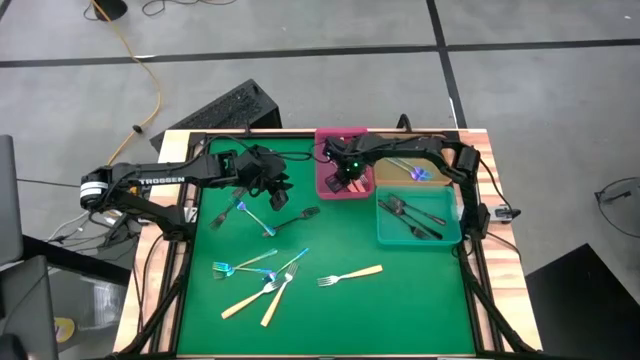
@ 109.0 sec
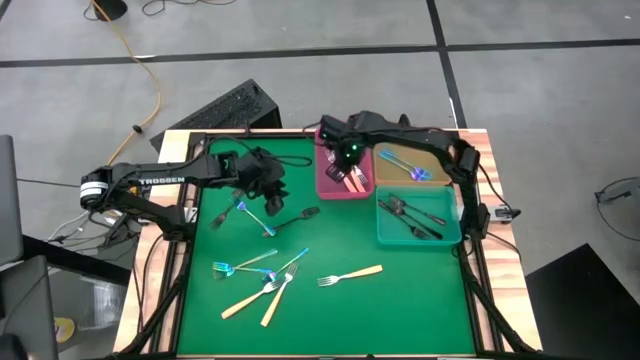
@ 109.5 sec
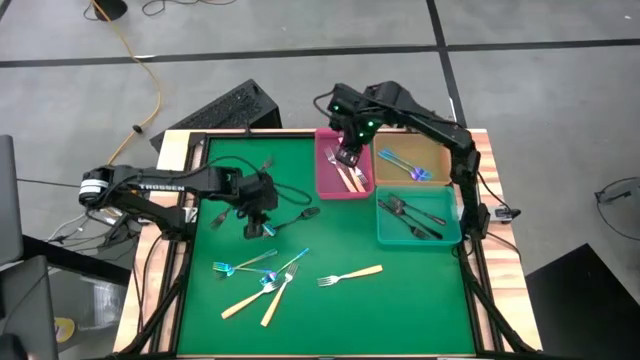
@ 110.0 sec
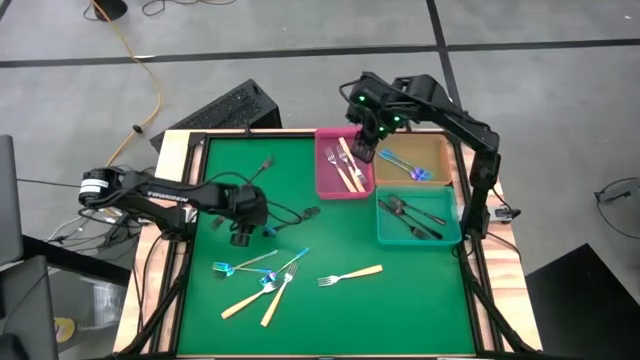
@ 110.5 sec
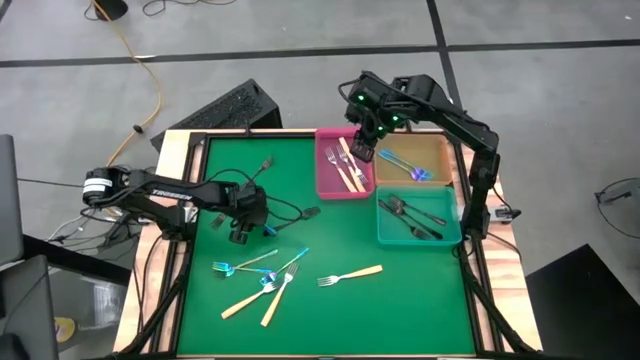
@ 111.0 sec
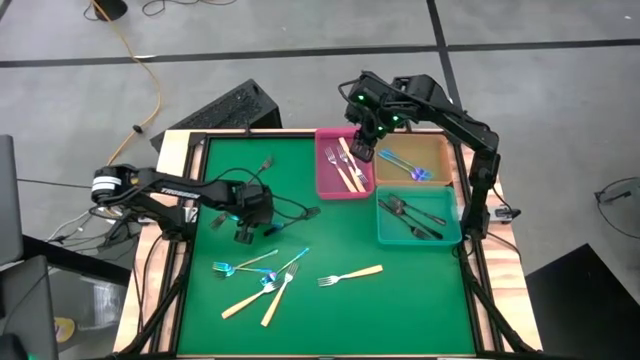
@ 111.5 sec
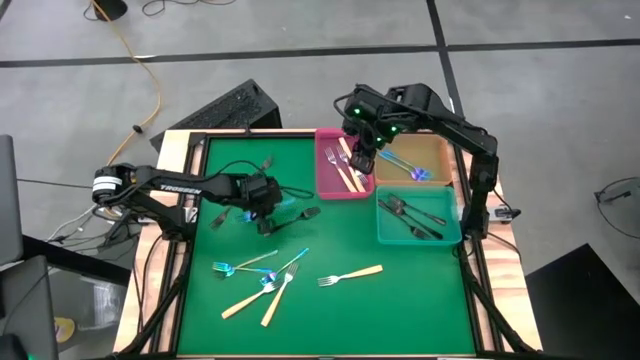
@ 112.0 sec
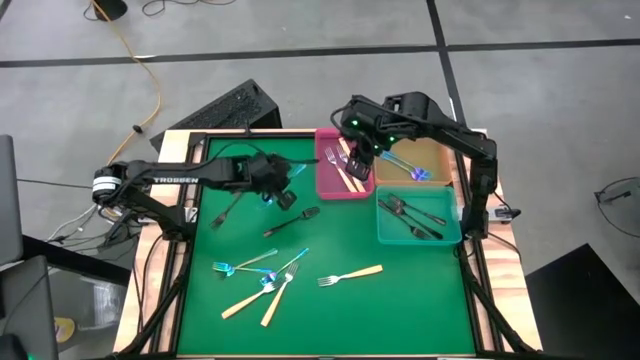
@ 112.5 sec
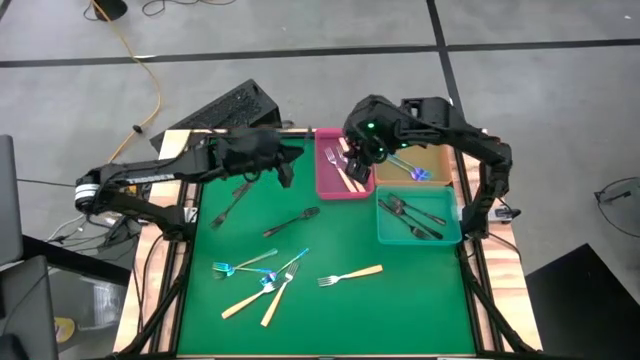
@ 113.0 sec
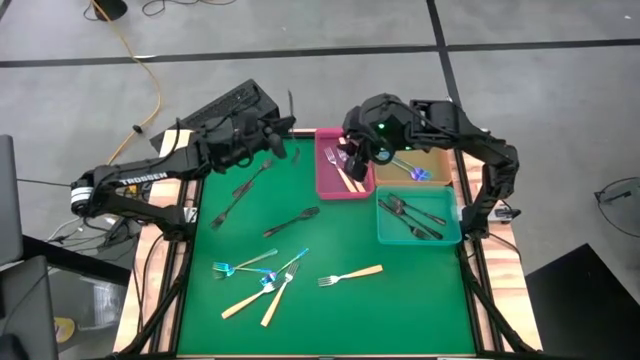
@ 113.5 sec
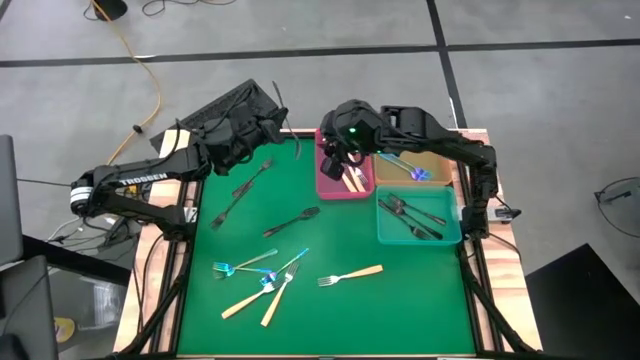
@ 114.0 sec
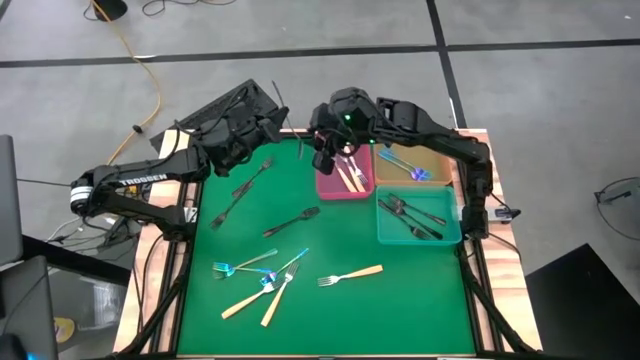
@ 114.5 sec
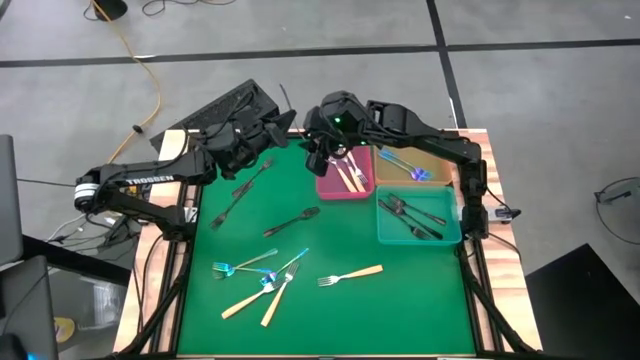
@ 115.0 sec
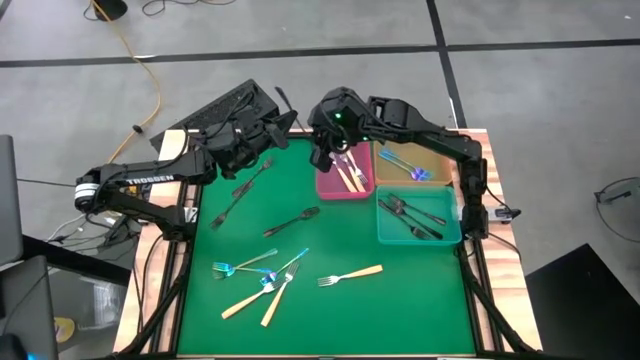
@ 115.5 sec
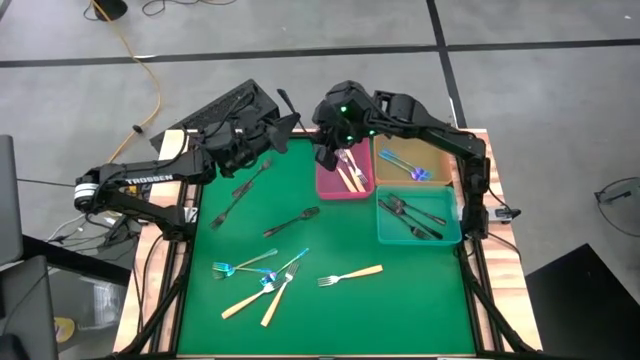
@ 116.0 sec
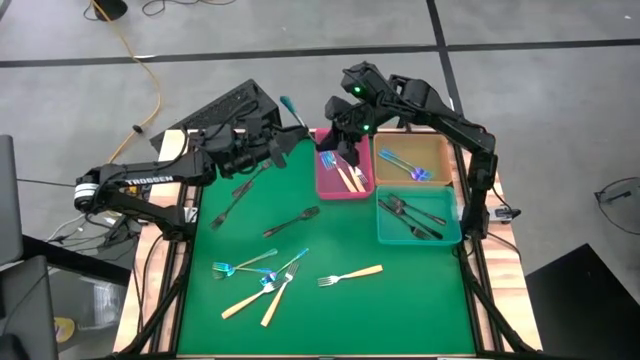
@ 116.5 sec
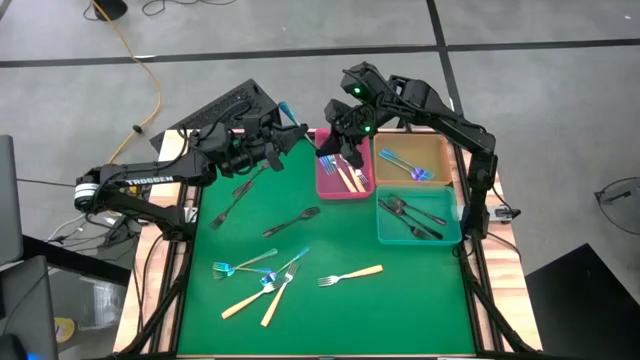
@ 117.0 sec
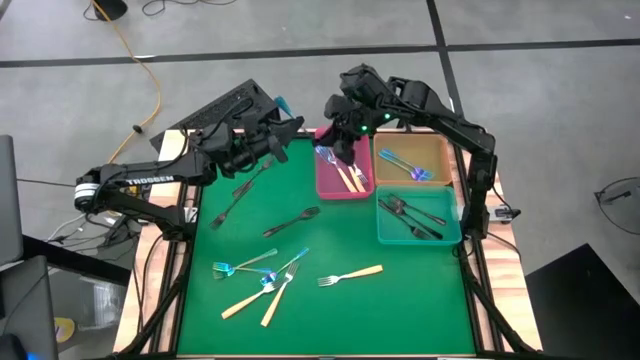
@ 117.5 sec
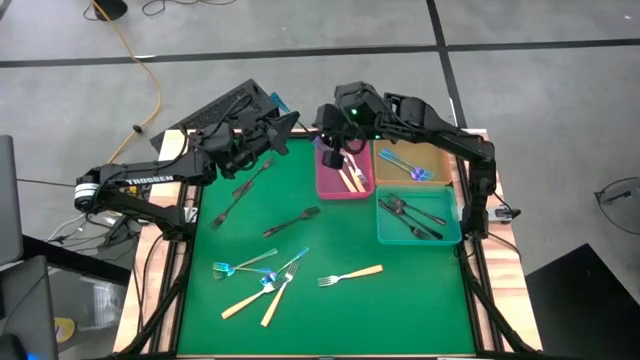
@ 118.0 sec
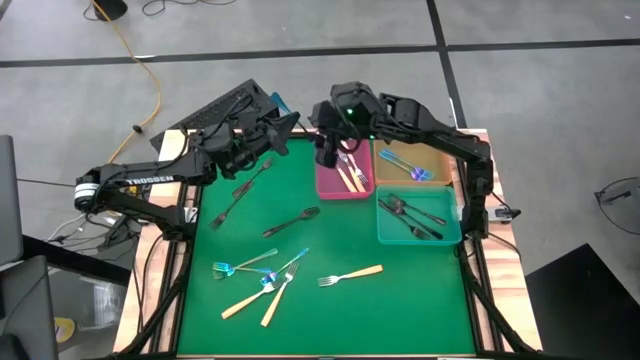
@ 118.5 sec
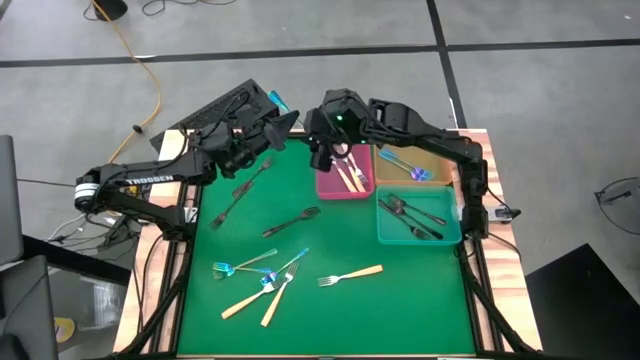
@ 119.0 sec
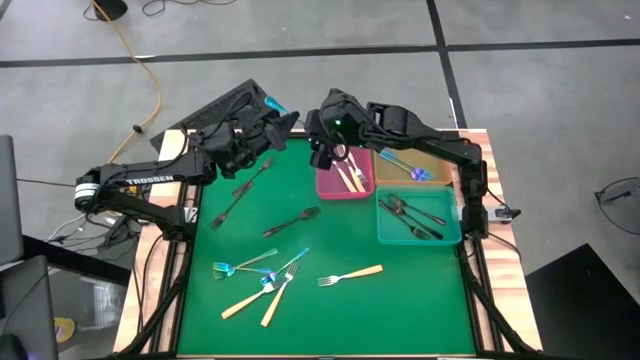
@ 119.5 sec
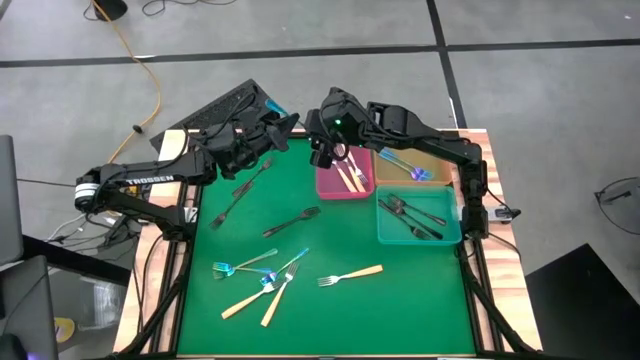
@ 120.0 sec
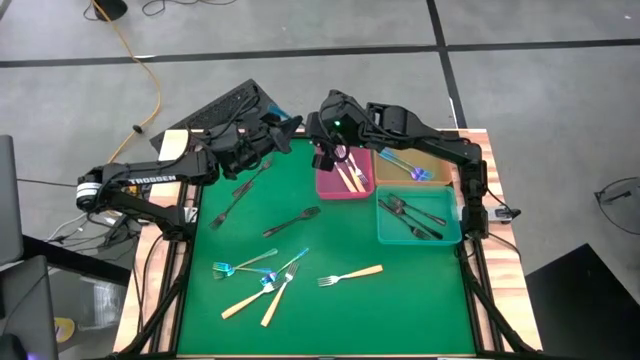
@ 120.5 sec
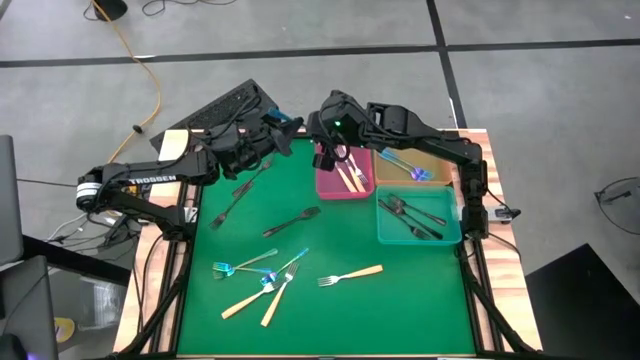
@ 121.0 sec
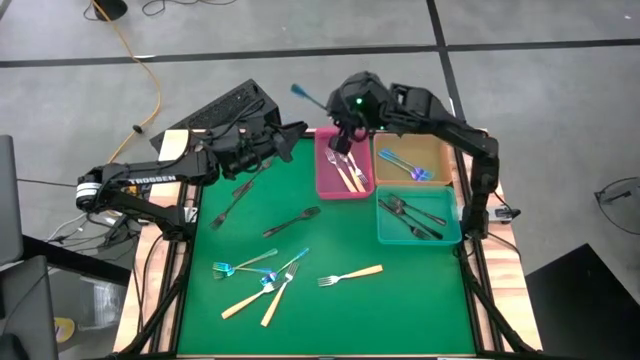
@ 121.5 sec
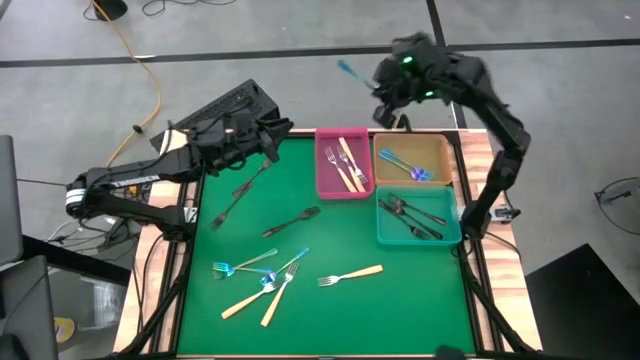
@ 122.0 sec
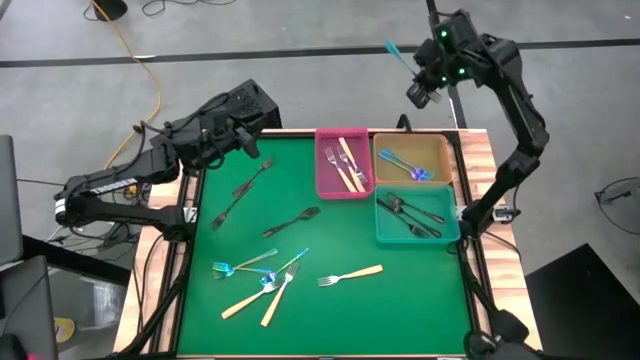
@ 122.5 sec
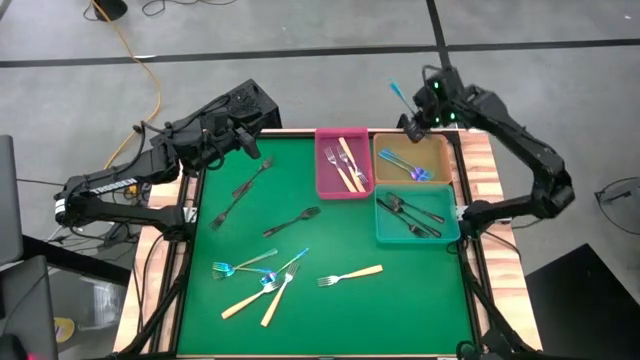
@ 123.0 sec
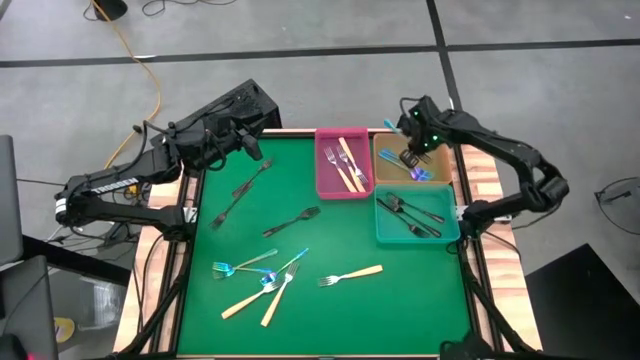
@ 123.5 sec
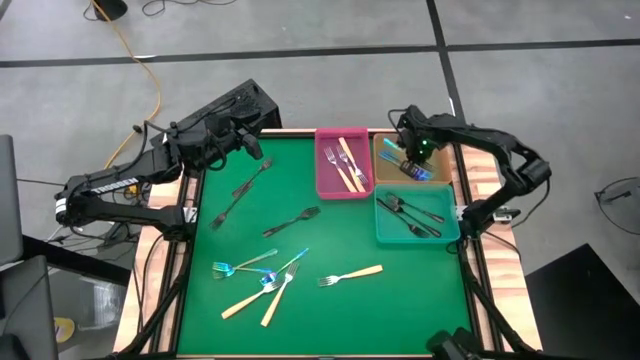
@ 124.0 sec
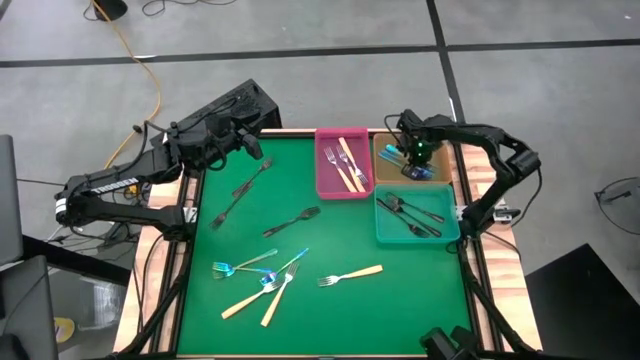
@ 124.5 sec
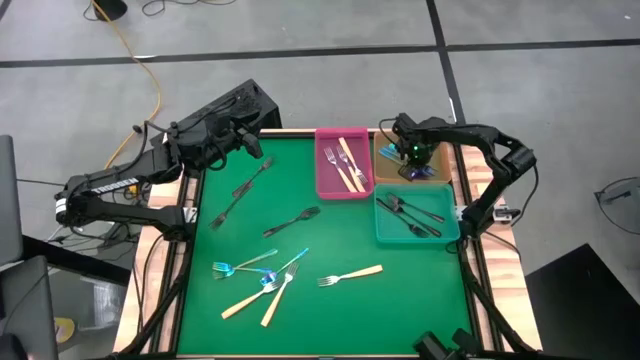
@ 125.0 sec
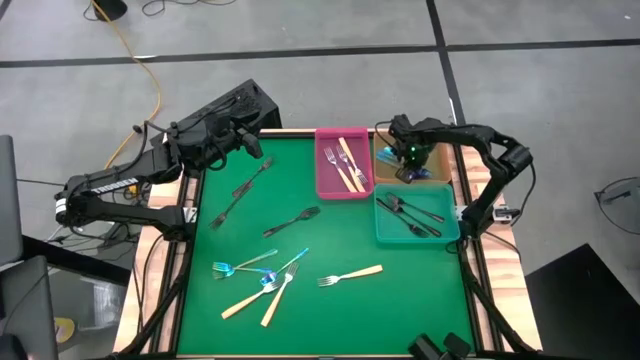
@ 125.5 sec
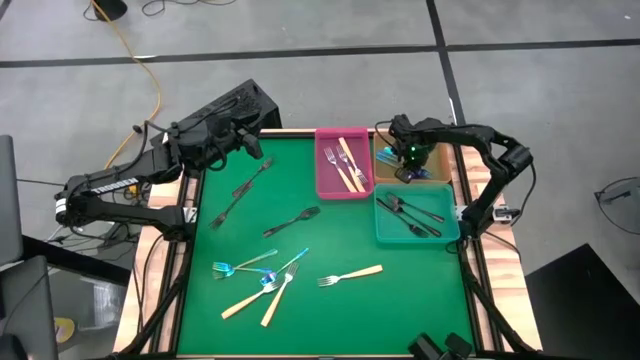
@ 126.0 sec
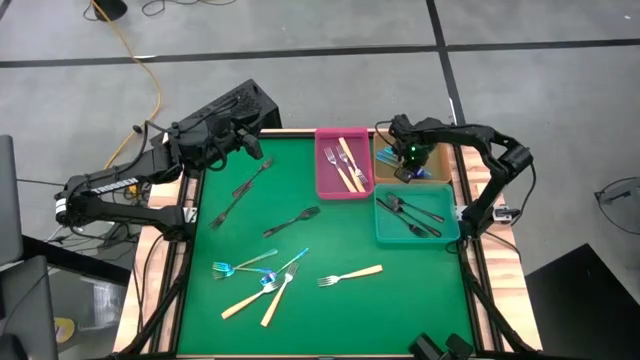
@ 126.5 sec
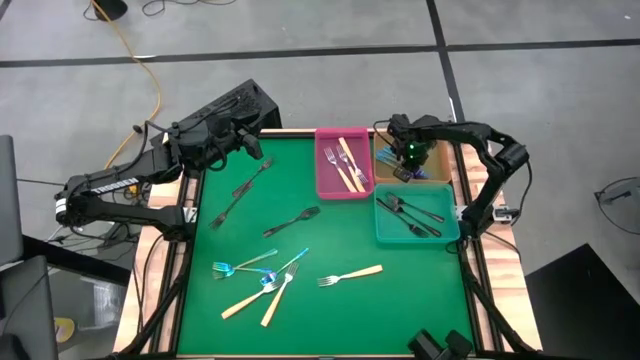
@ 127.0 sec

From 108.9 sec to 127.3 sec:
Task: Sort silverware by color (type)
Put the blue fork into the orange bin

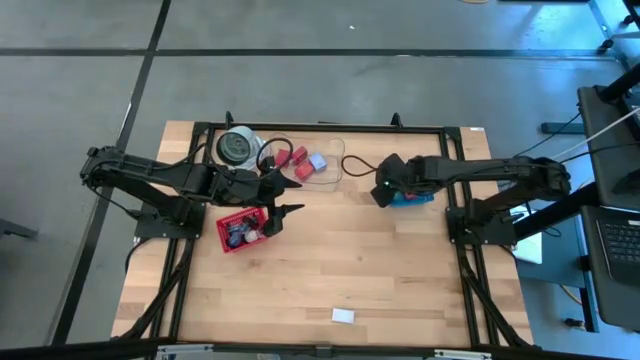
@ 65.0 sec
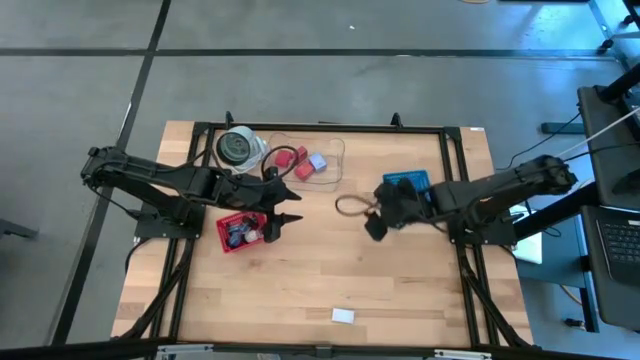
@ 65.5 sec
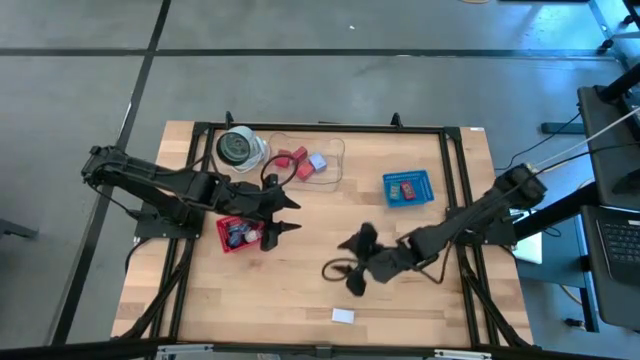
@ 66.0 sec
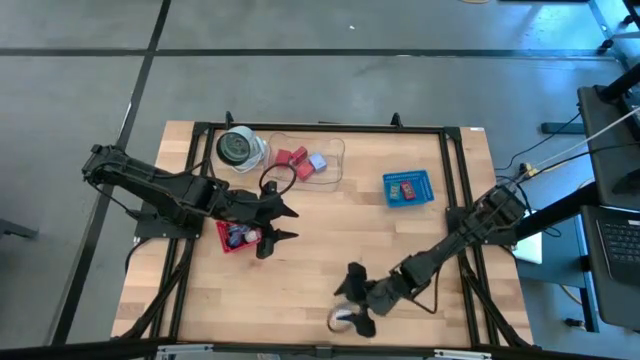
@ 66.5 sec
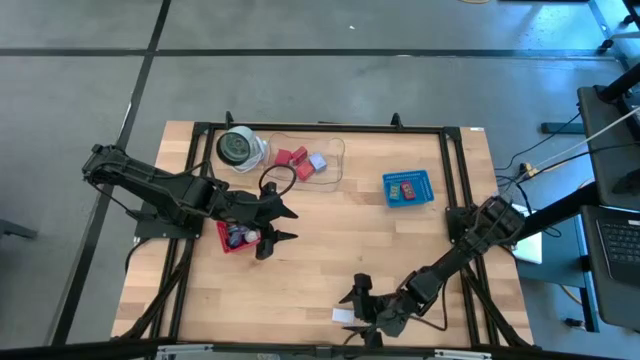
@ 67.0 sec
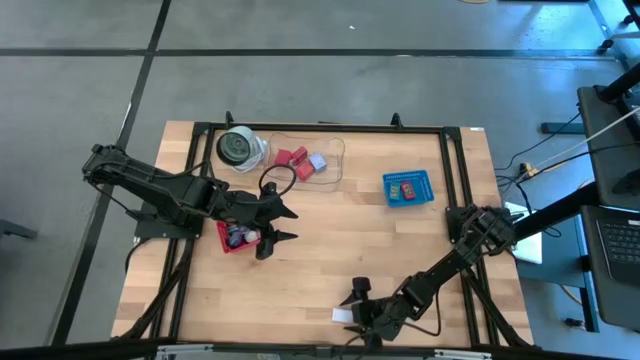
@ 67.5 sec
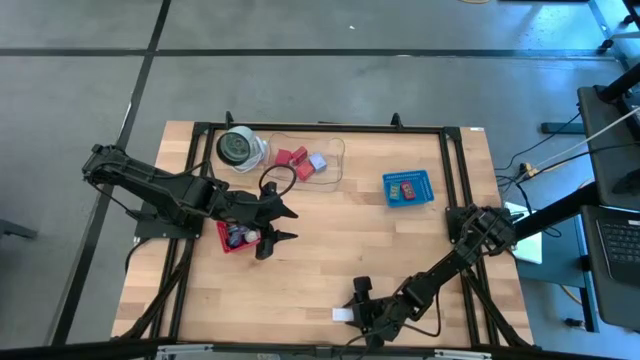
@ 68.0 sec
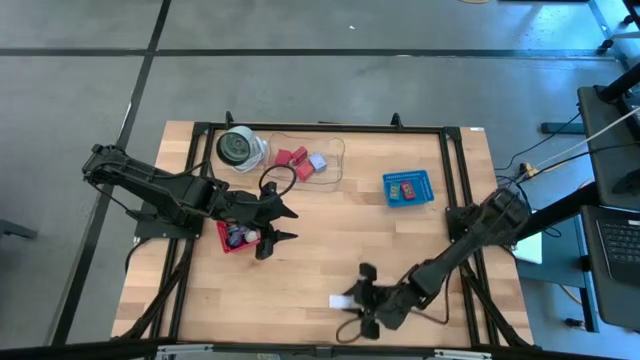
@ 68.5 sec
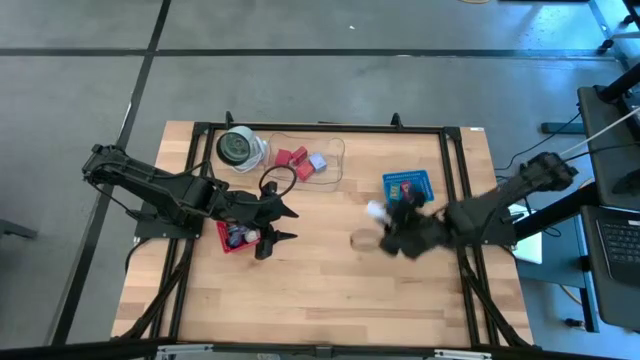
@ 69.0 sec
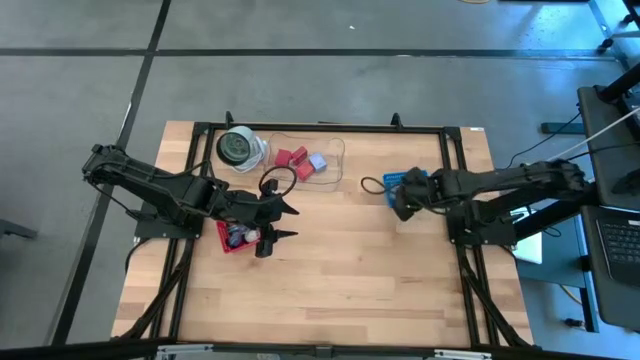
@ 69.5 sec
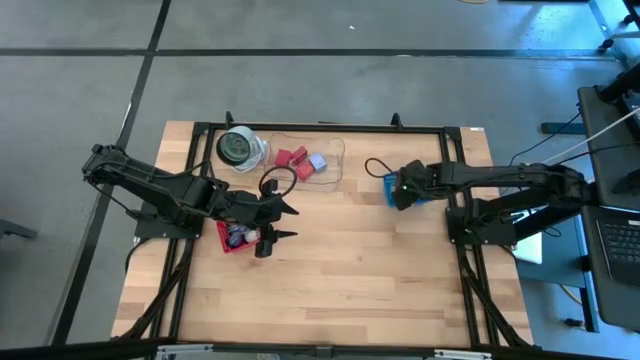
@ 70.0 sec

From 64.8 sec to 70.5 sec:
Task: Pick & Place Office items
Put the white digital timer into the blue bin
